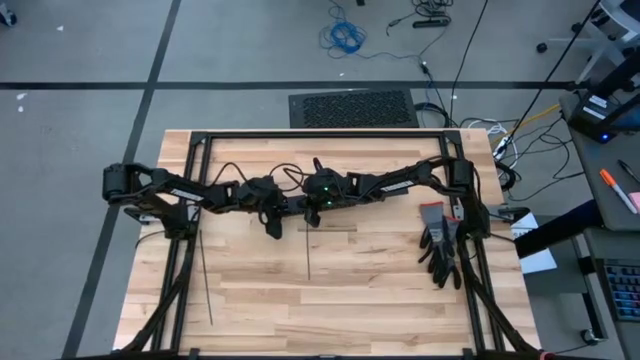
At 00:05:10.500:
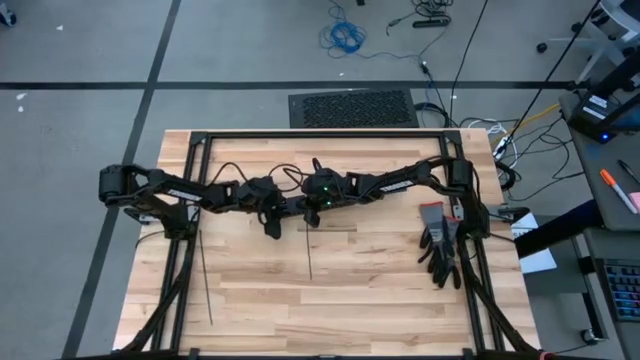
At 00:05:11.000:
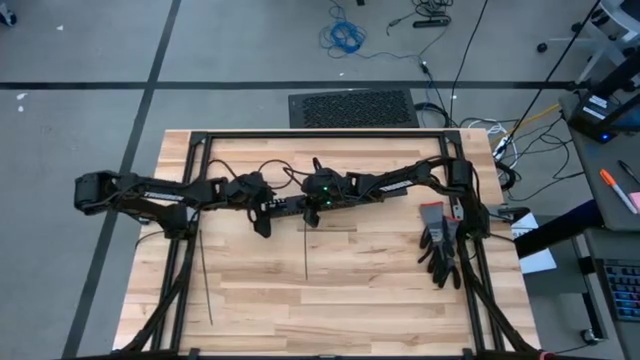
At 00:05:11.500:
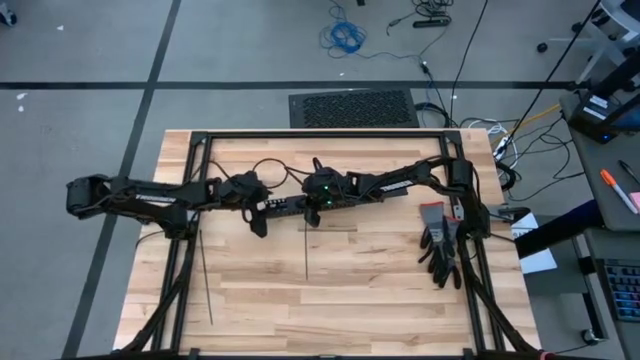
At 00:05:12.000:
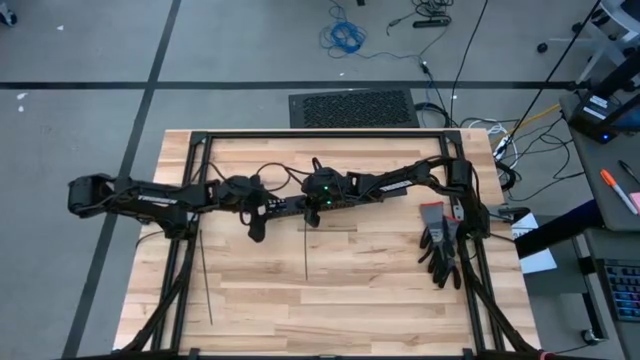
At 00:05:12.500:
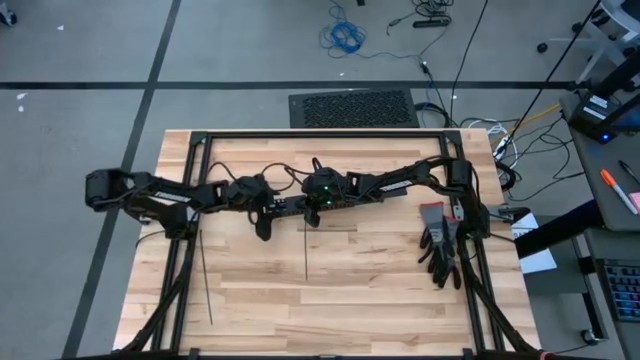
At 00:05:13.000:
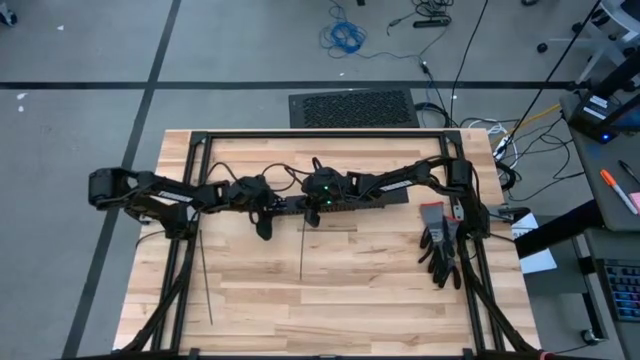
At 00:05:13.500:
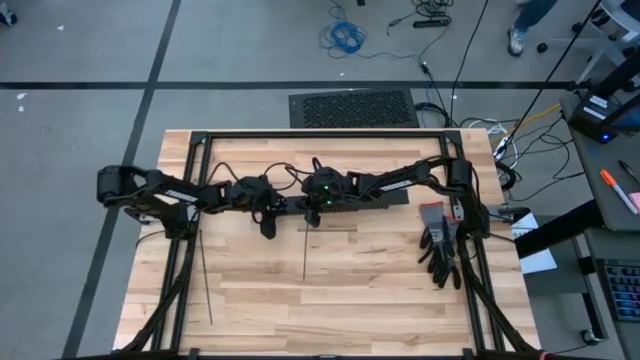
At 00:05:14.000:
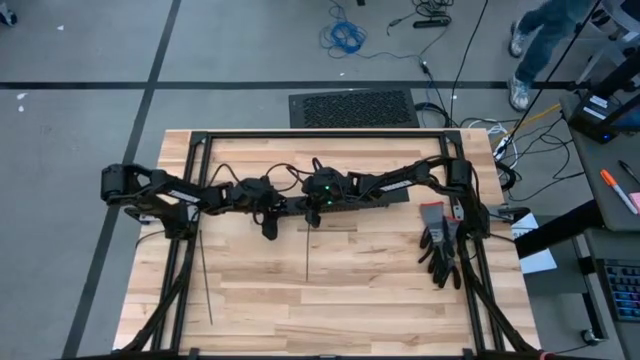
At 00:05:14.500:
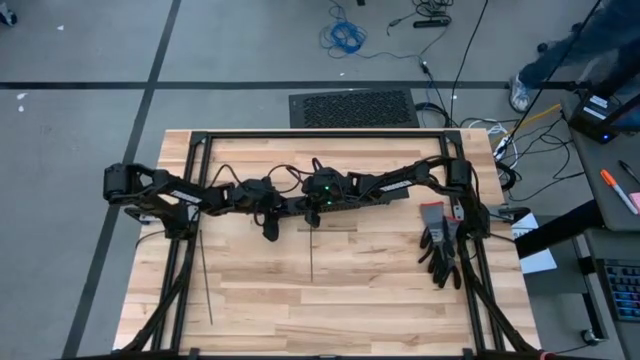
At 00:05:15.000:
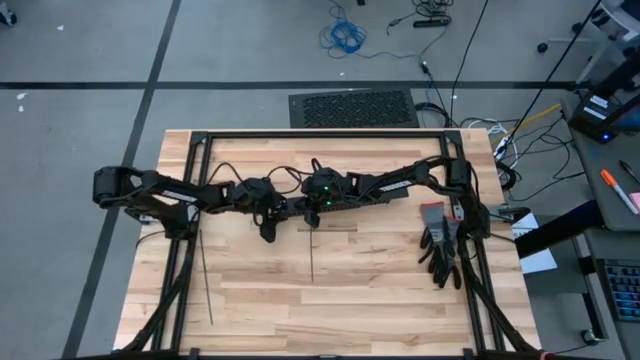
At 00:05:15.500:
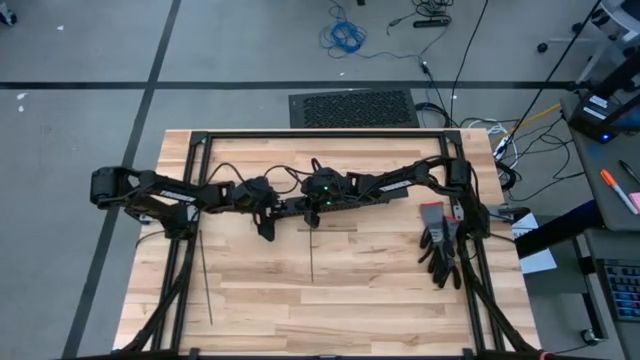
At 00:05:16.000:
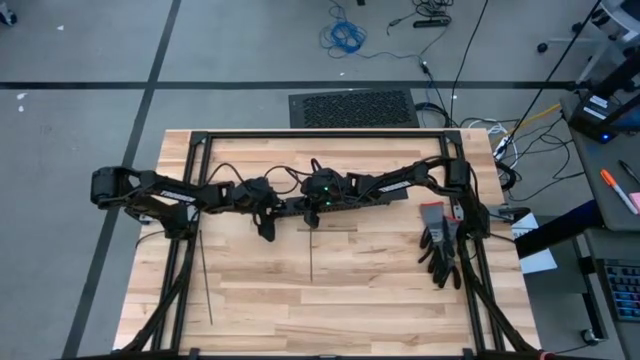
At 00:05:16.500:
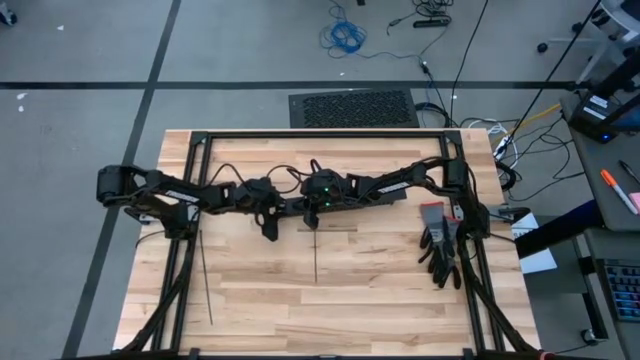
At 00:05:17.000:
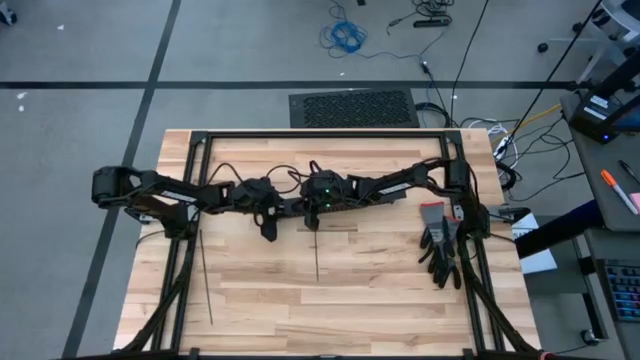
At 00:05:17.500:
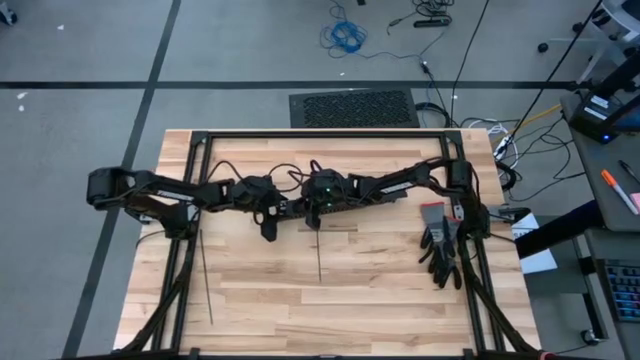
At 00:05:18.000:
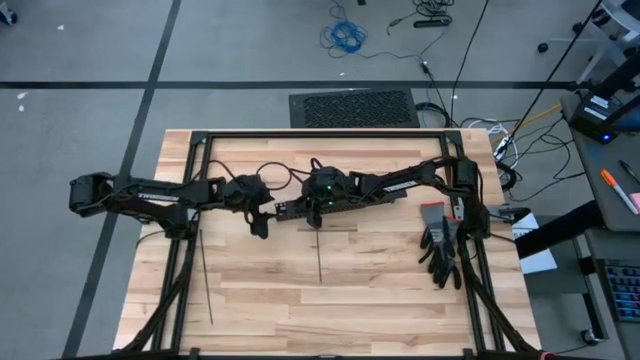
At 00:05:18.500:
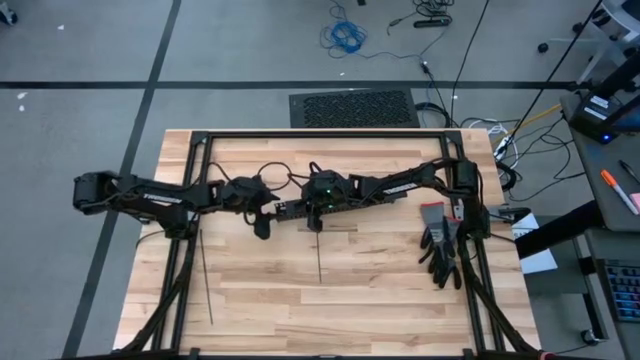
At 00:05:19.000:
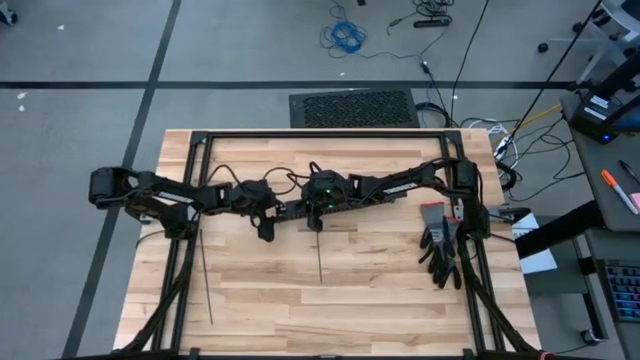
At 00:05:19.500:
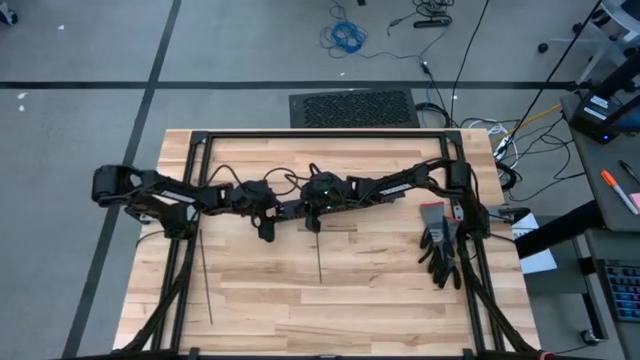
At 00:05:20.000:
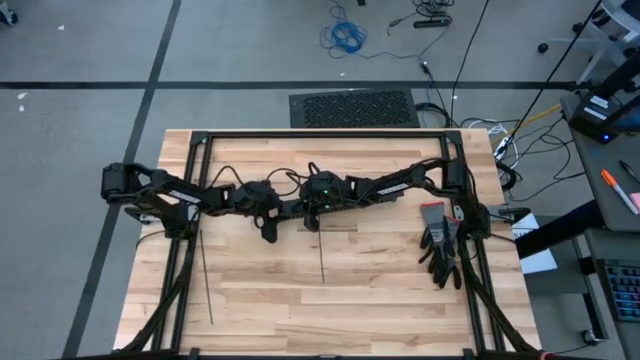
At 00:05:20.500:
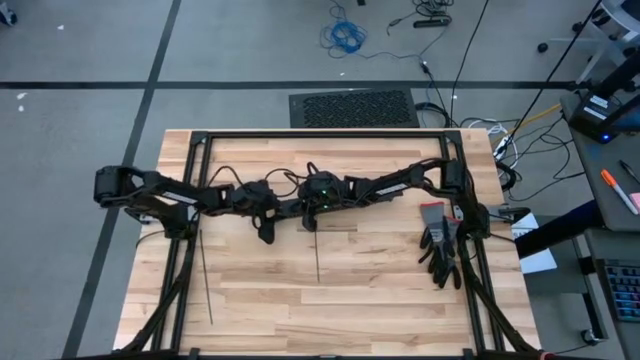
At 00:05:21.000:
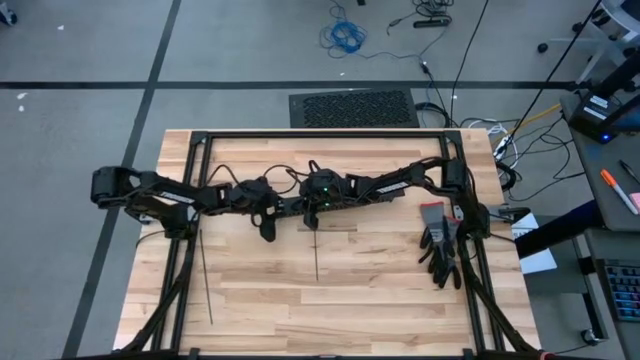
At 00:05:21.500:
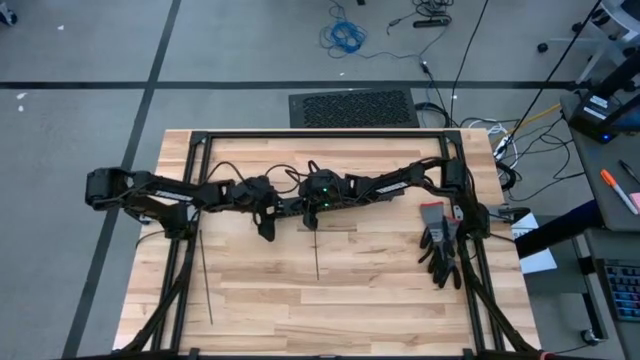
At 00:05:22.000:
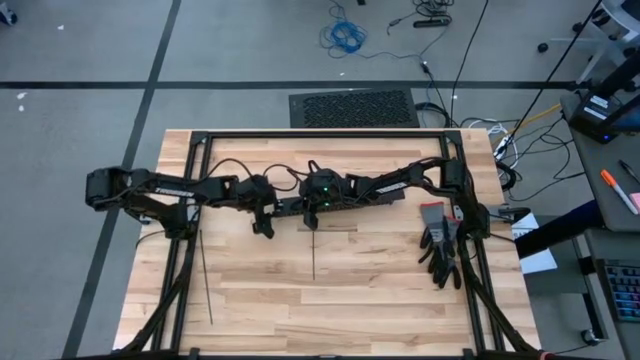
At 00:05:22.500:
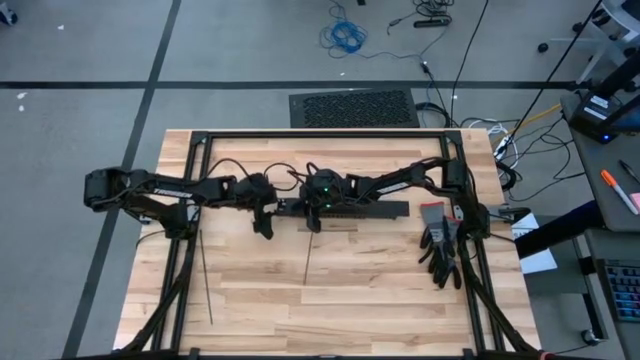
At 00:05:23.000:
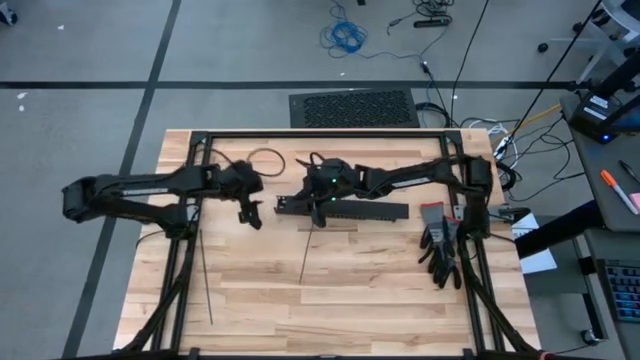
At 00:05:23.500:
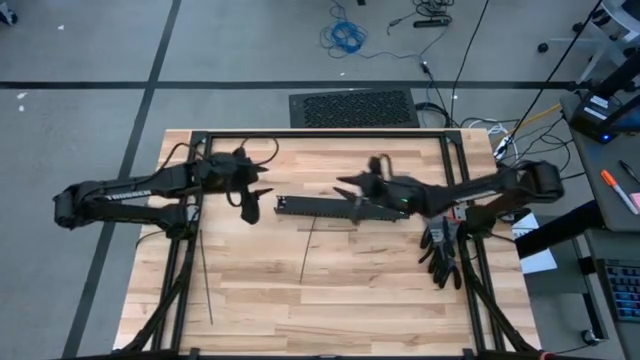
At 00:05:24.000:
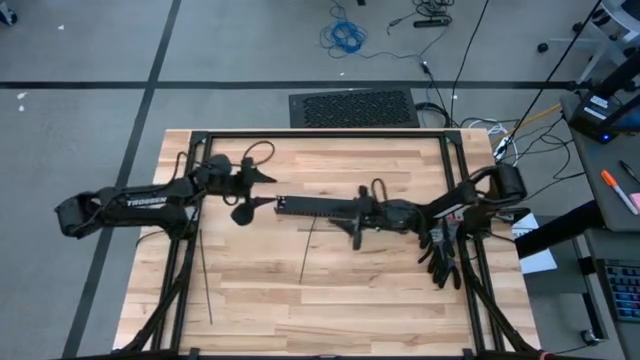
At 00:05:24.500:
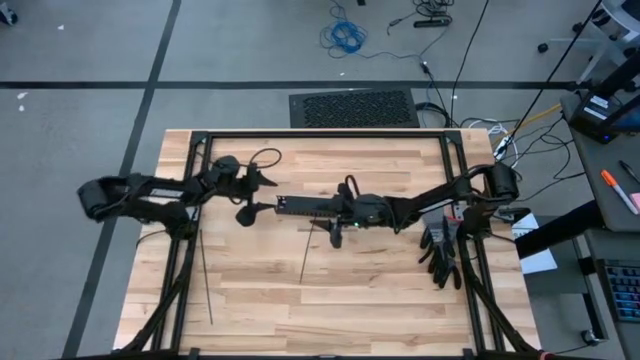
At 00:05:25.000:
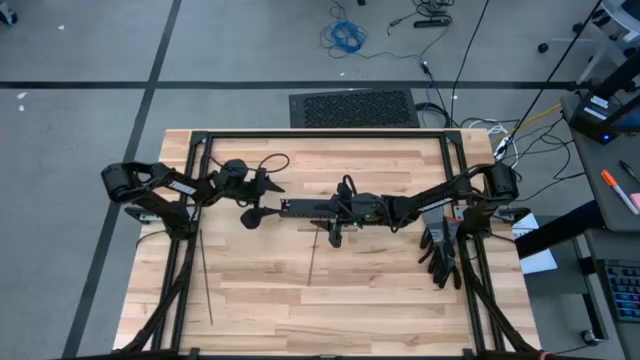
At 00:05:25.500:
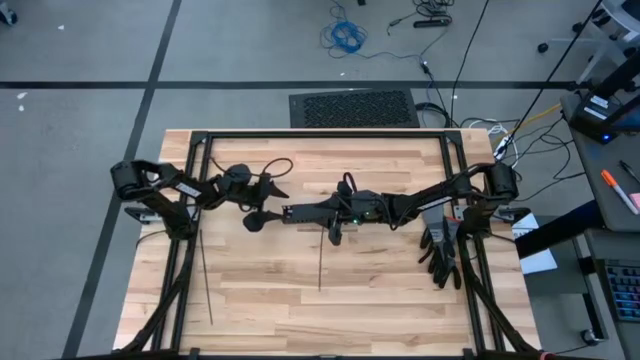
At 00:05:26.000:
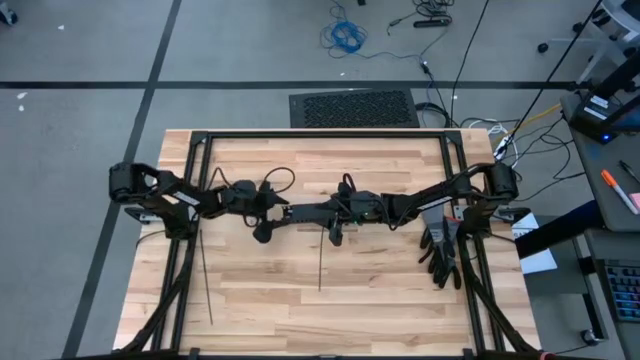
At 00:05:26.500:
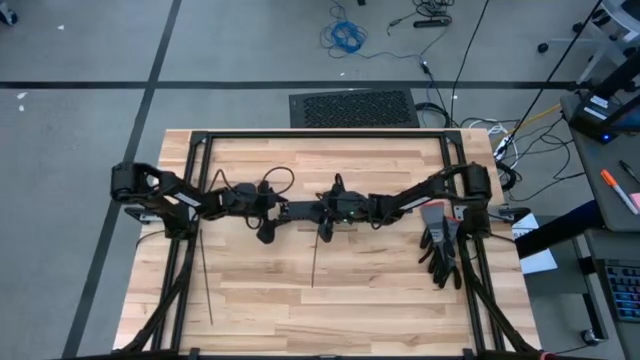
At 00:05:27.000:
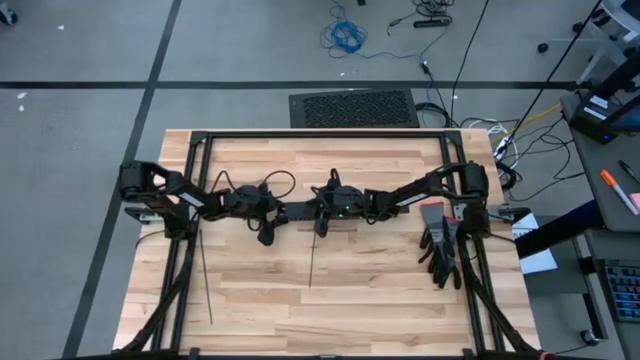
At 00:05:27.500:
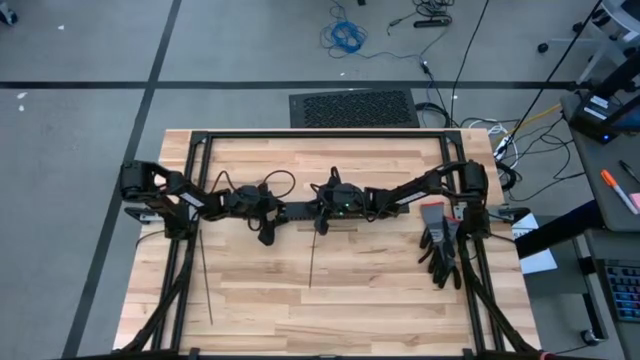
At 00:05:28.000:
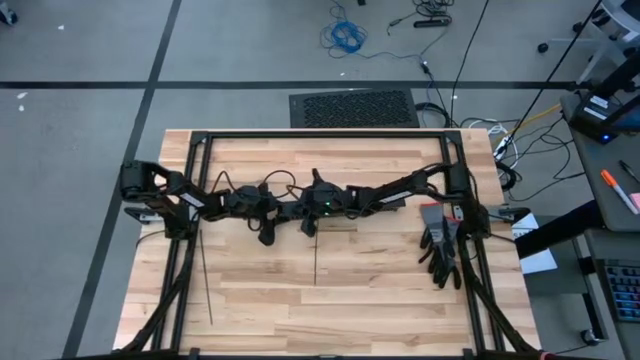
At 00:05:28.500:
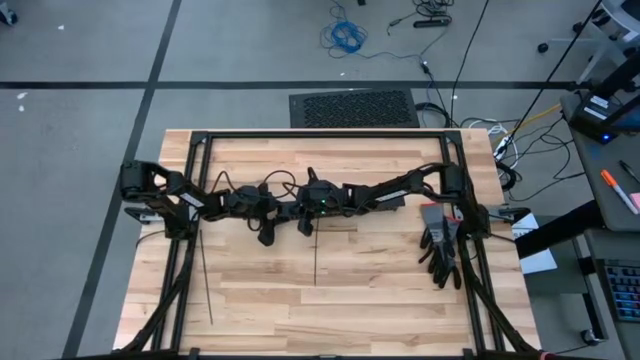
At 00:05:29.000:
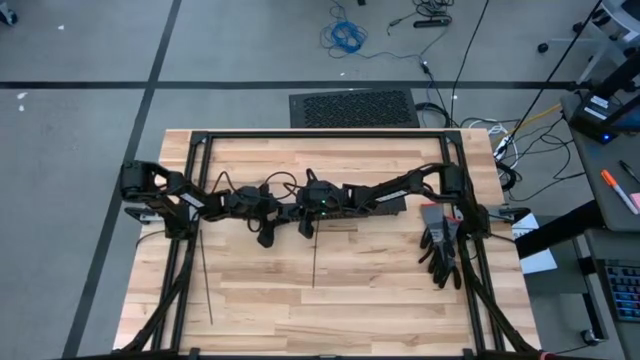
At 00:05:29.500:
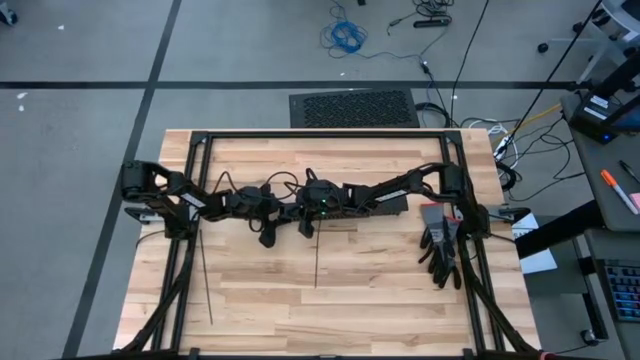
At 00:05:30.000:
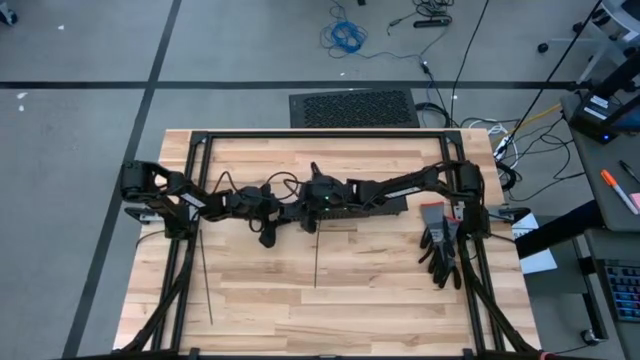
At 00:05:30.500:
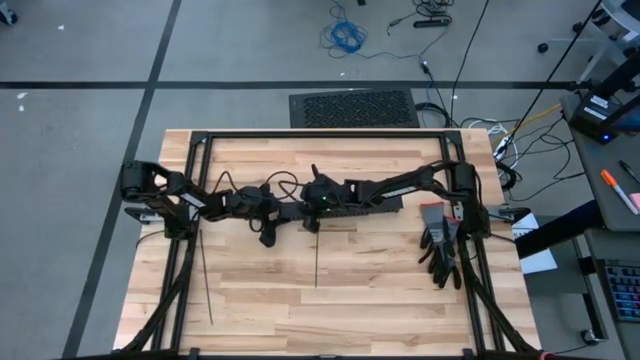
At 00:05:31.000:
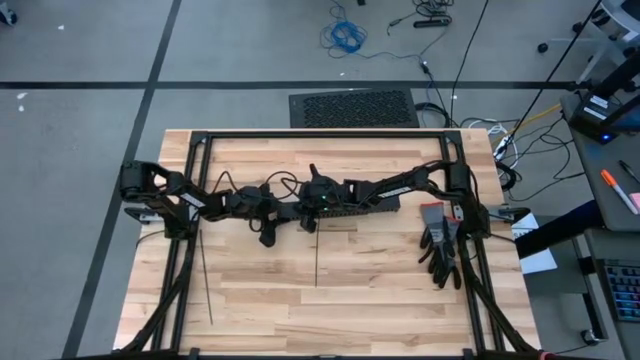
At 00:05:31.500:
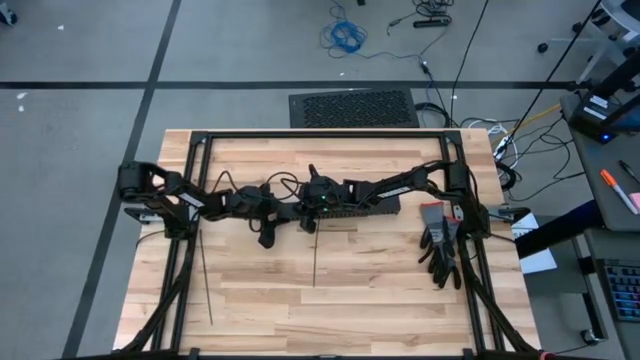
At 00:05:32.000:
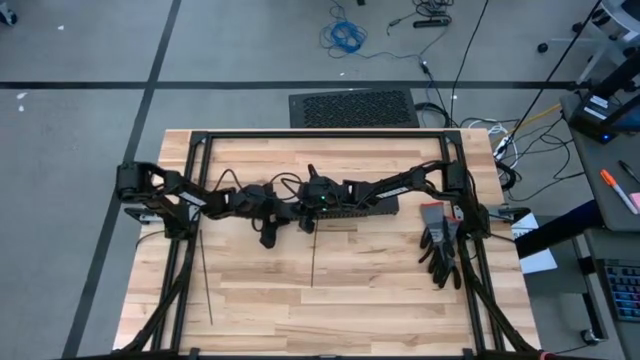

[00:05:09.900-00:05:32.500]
Task: Ziptie cables
Close the black cable duct with the cable duct cover
